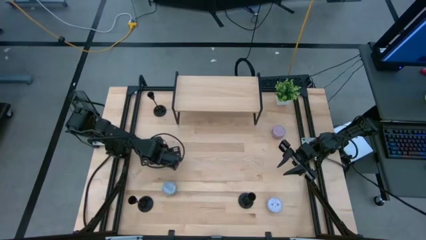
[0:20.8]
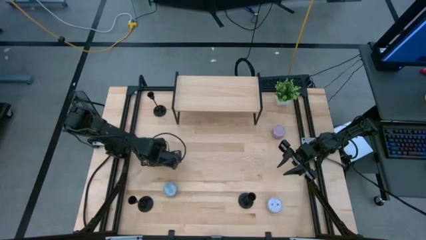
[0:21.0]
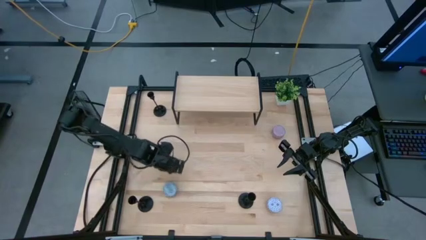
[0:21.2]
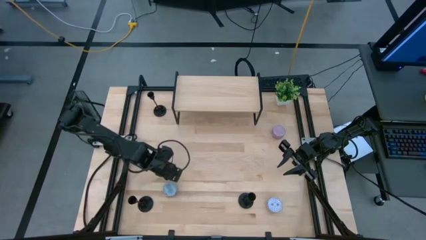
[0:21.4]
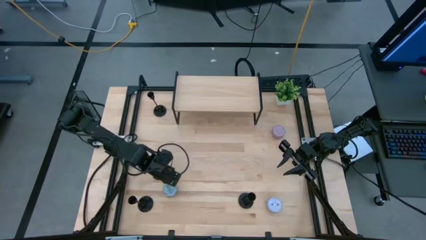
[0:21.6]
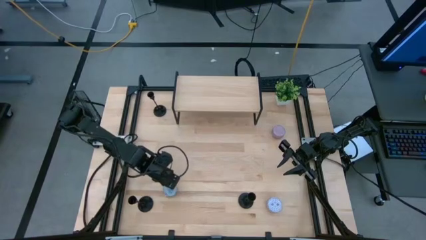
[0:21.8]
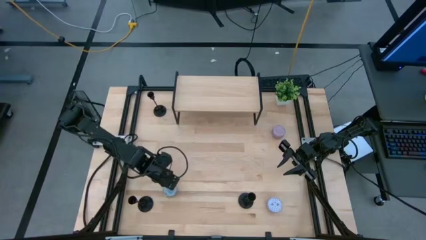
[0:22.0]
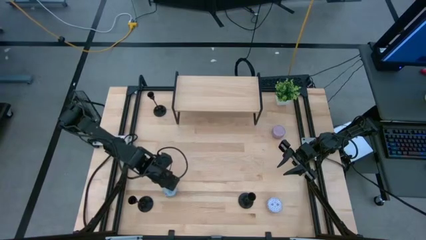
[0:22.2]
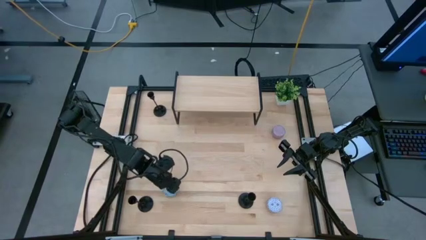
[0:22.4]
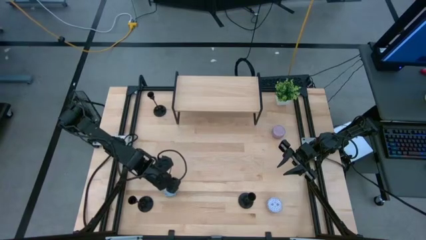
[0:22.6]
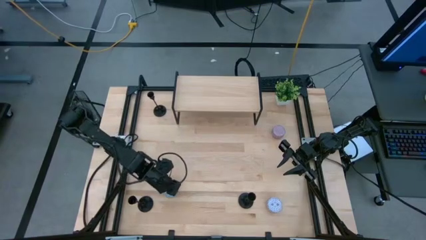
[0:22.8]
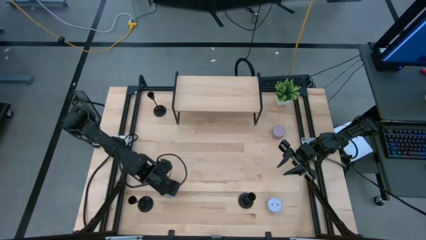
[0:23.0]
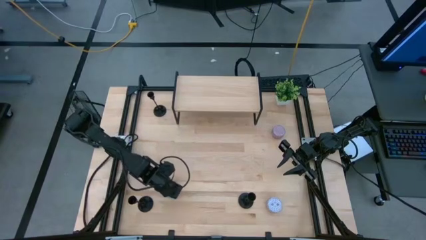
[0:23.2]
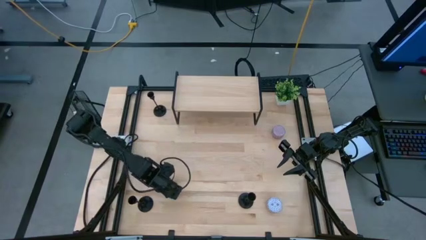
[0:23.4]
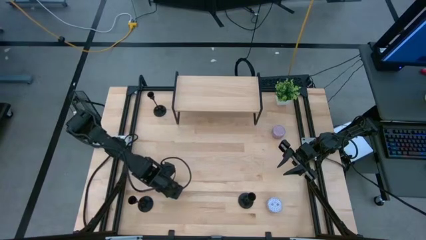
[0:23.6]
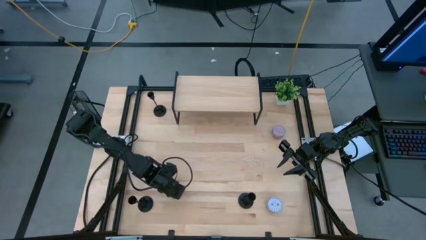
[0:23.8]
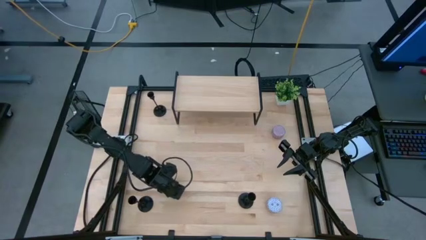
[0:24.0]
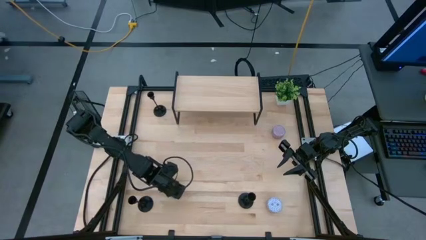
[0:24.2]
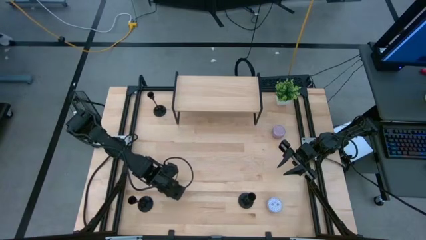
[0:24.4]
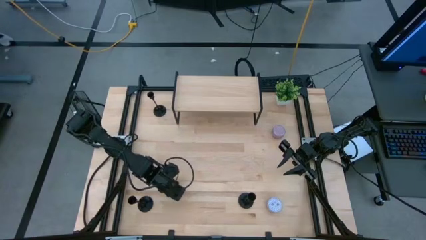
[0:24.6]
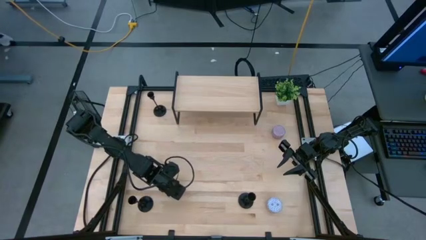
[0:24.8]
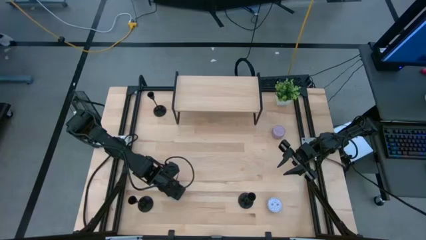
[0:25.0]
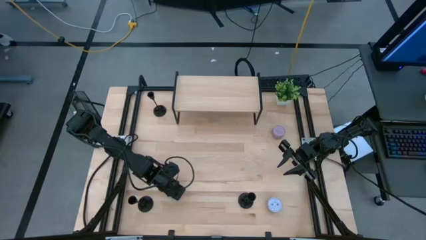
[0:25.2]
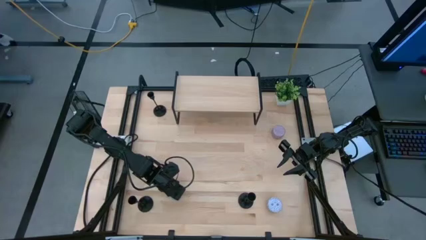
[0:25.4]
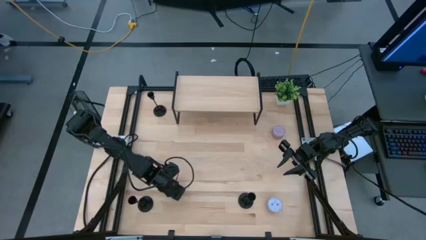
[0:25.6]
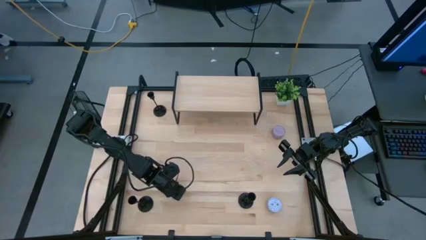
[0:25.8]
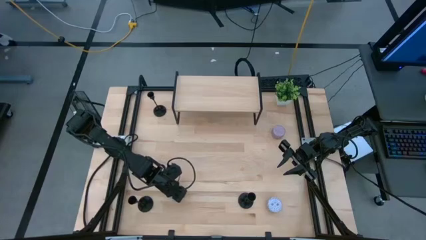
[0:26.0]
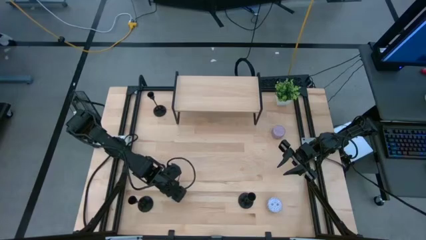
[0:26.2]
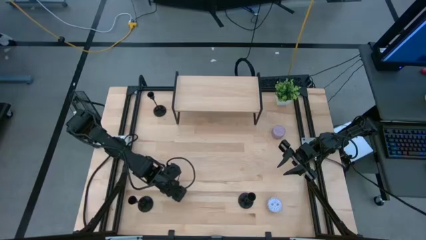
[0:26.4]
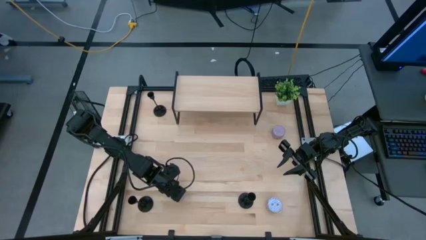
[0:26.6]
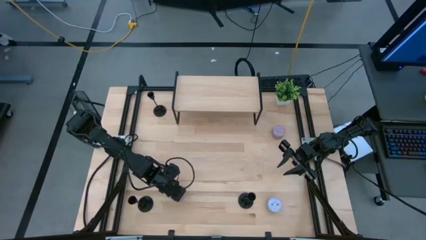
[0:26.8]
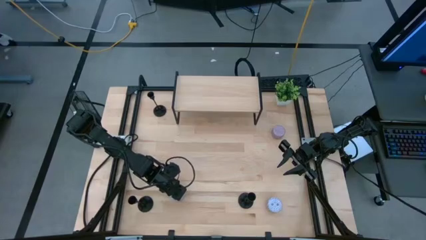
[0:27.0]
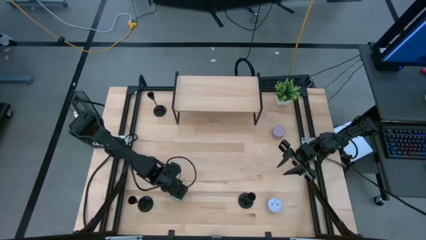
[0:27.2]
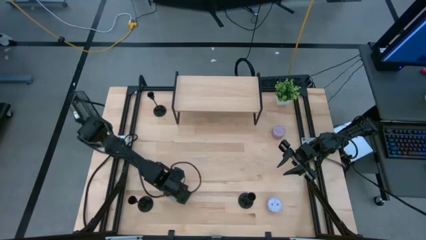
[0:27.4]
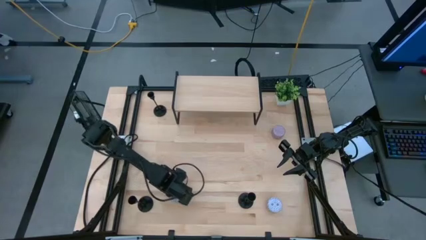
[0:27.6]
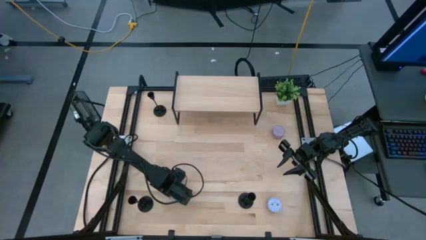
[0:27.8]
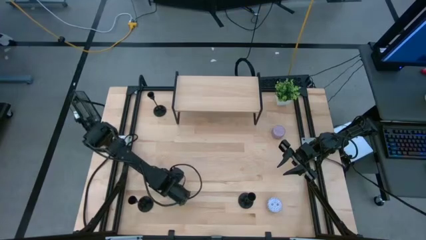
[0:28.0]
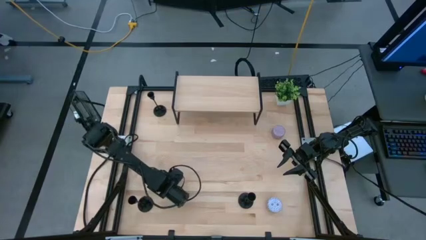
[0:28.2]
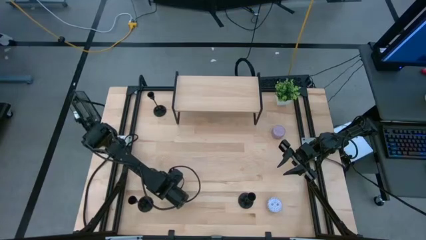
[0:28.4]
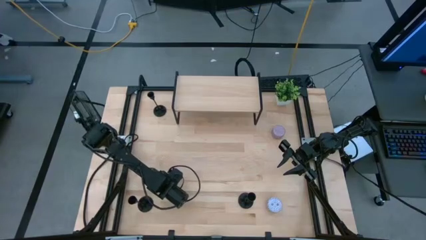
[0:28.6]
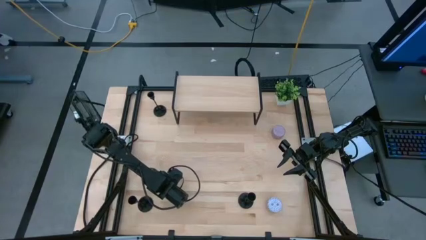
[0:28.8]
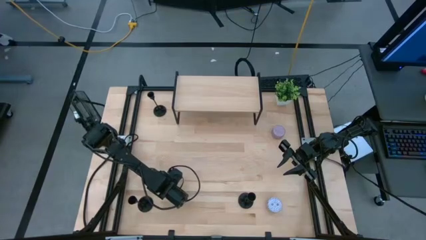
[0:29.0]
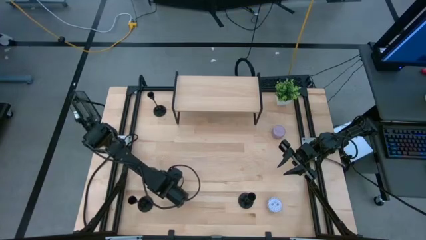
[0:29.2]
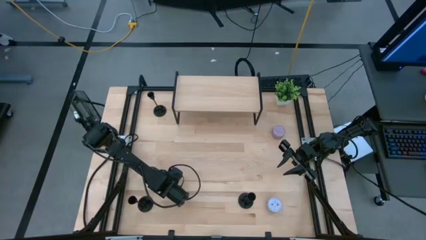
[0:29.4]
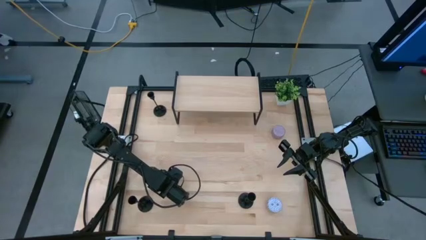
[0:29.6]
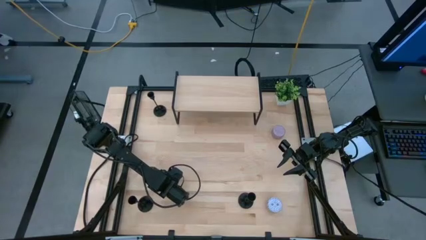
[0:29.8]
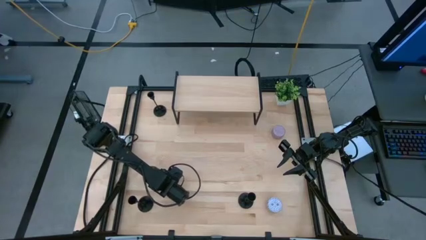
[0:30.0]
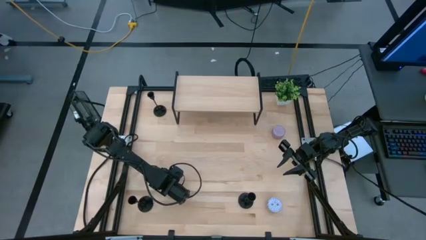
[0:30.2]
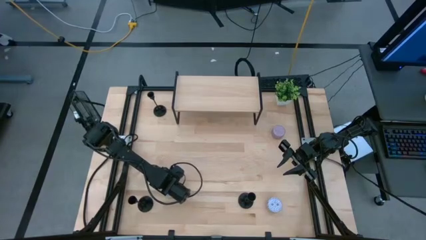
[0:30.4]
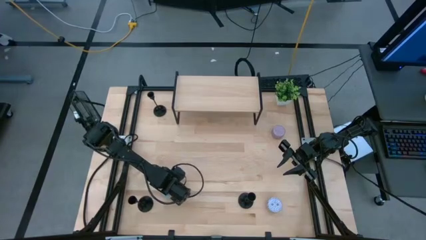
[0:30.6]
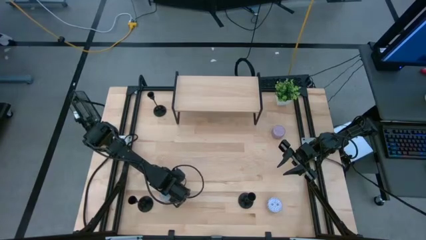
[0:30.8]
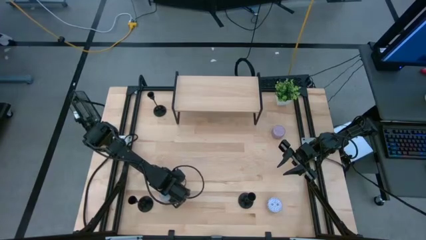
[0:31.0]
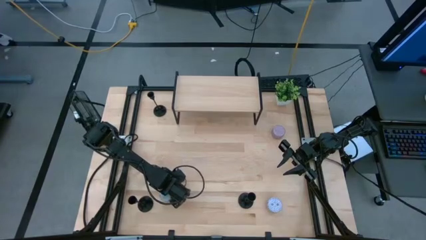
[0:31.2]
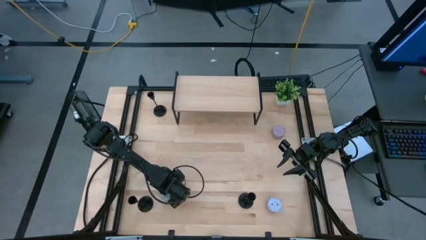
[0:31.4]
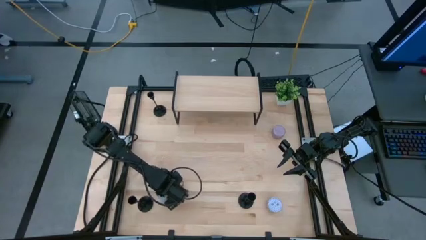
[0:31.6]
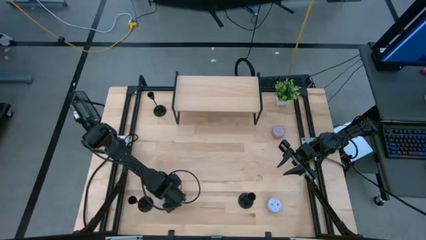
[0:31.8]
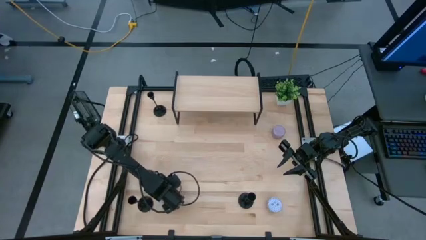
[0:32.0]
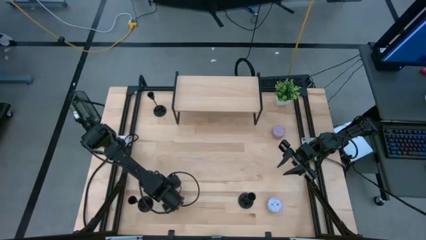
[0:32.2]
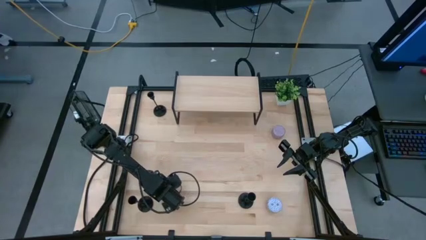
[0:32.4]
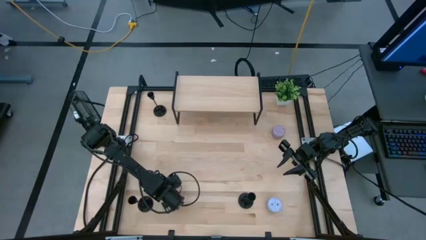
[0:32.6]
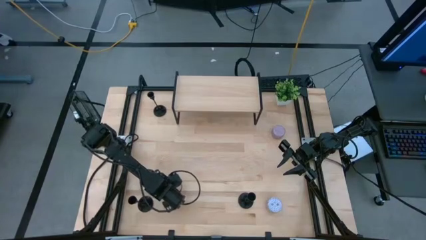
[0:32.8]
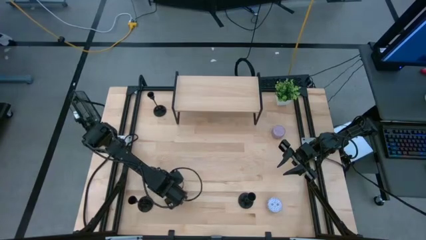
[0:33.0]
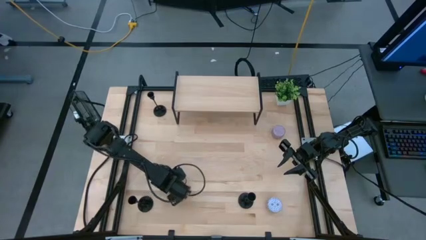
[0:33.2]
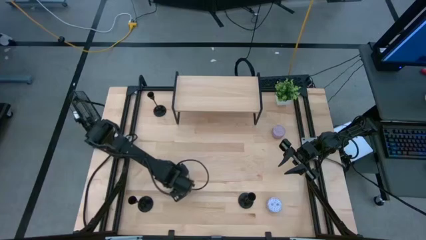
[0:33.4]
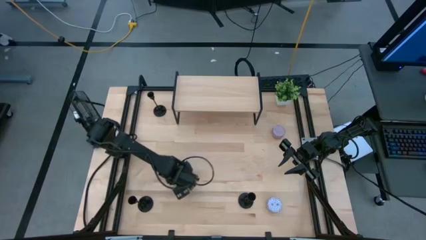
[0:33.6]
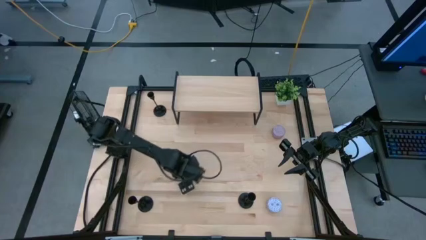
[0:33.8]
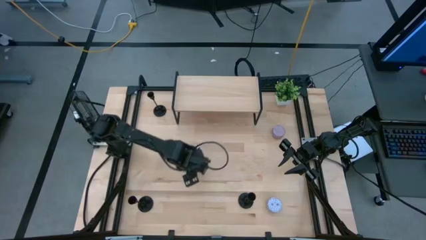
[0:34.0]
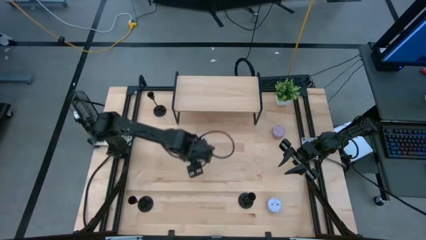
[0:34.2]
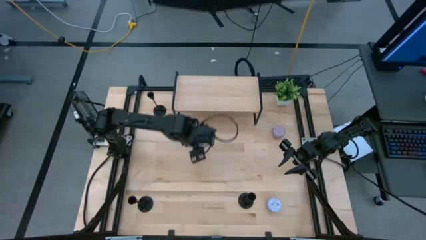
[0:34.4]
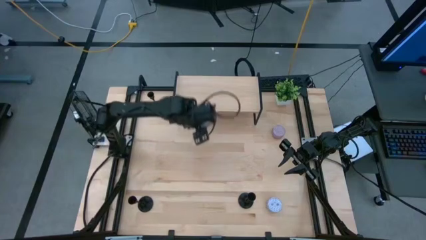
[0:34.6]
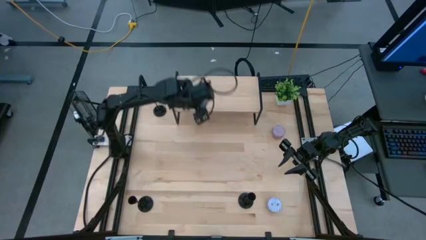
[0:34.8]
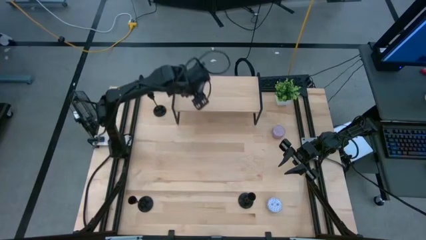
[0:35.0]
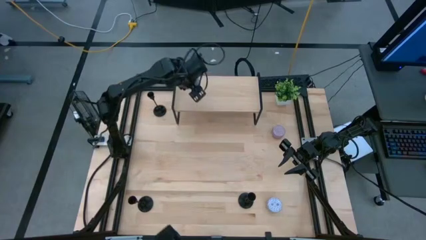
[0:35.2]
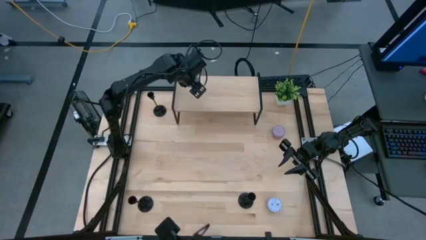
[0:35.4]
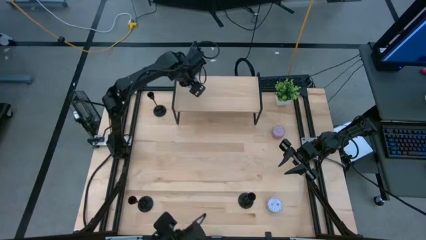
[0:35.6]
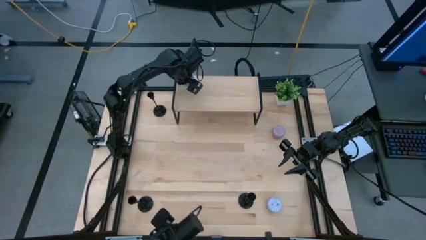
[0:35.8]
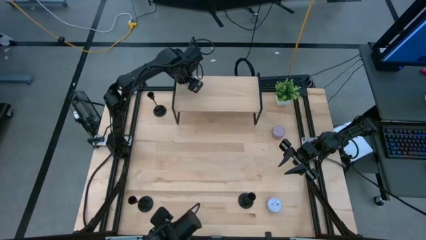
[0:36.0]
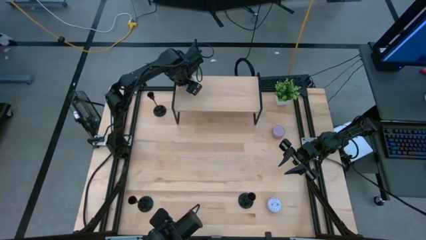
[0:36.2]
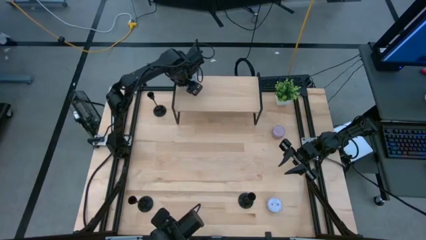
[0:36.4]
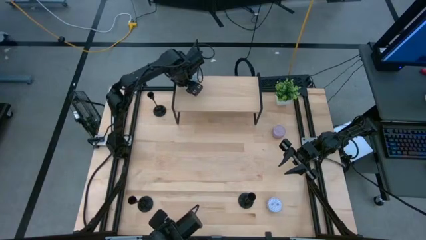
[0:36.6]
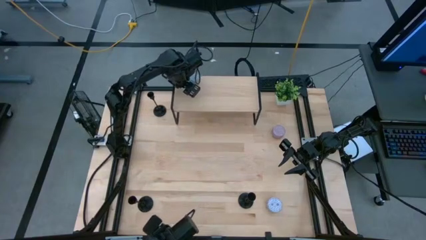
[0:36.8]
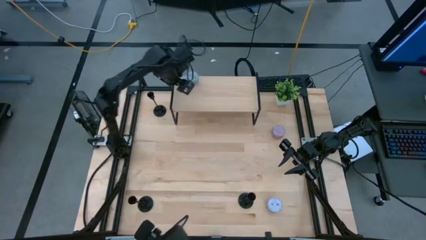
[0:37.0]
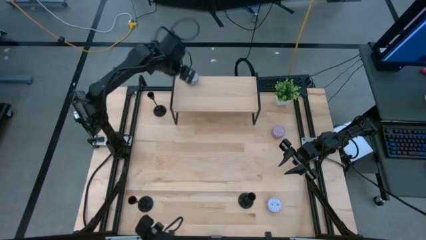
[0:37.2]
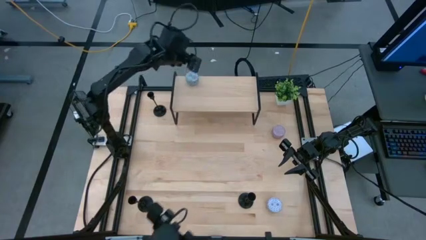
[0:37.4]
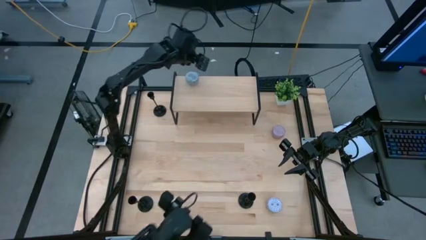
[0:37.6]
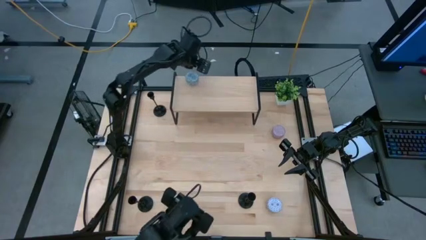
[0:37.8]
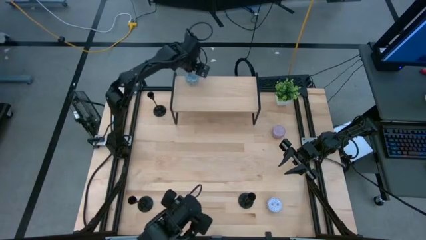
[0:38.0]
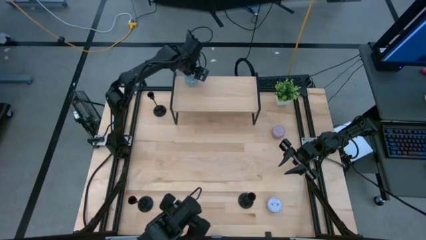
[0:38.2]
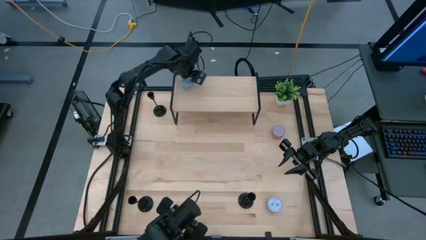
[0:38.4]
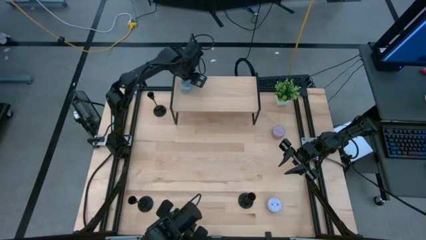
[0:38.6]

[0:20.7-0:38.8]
Task: Pick & Place candle stick holders
Put the blue patterned scented candle on the shelf
